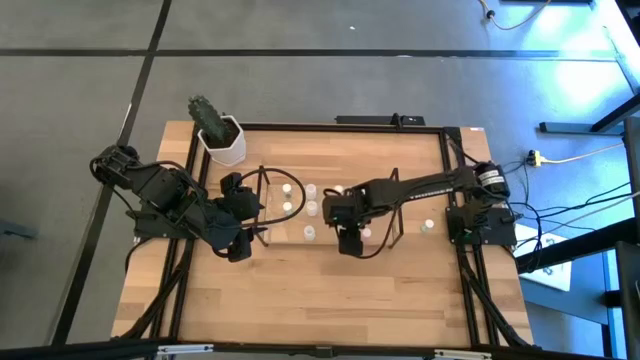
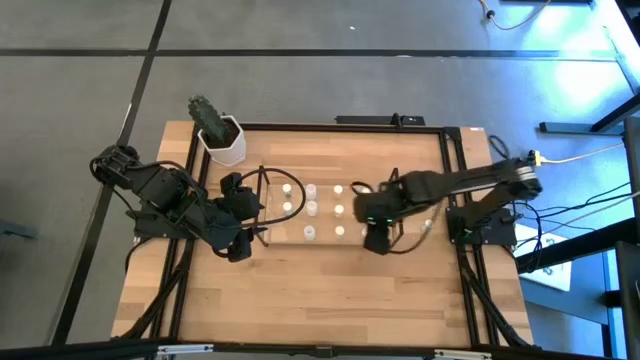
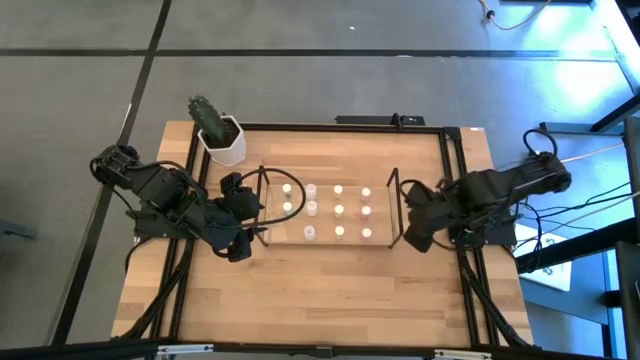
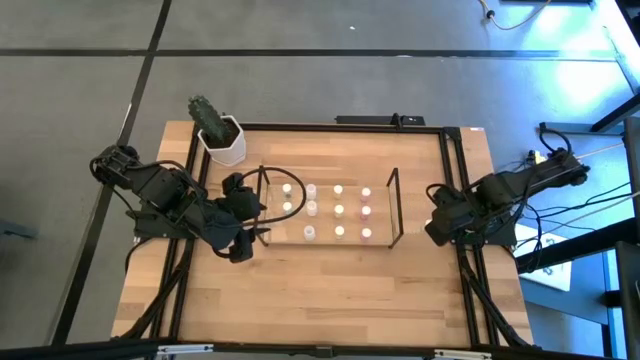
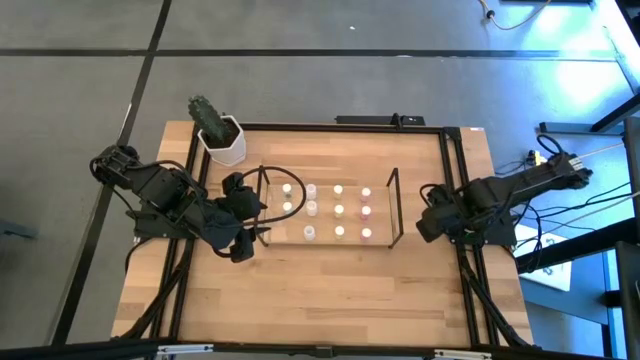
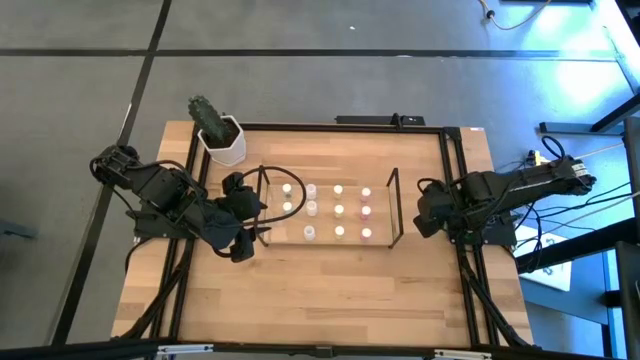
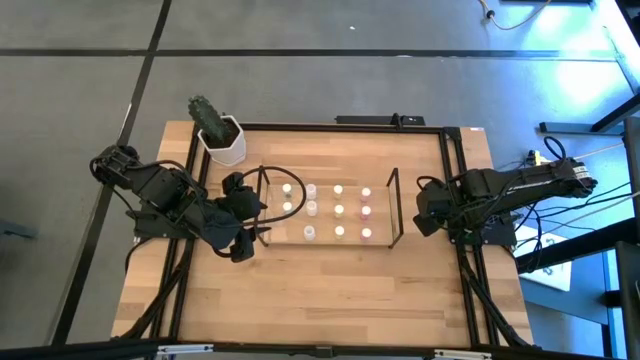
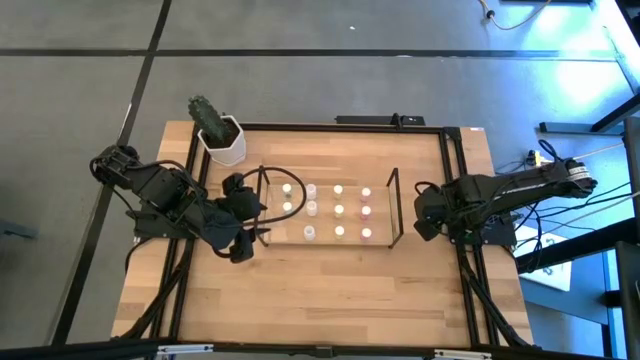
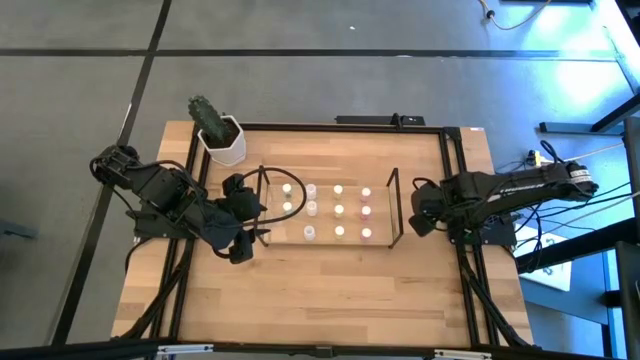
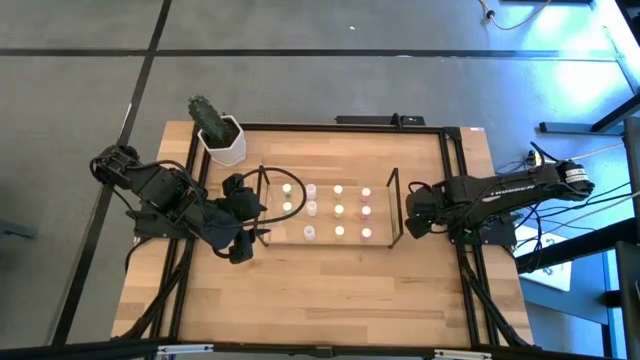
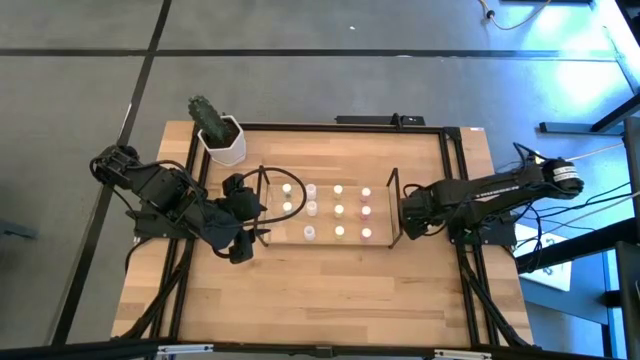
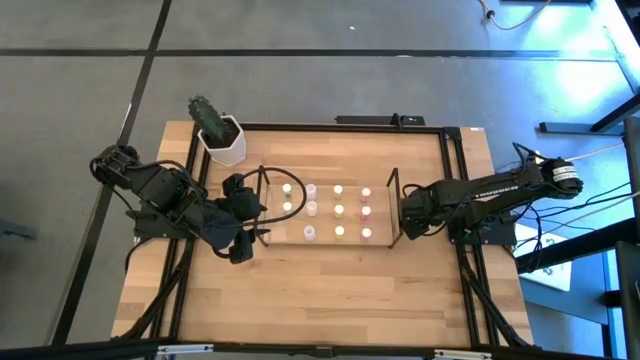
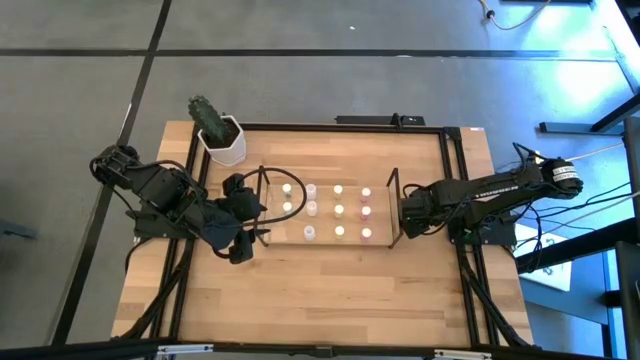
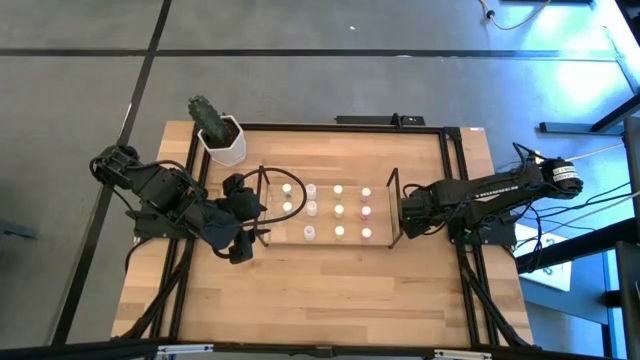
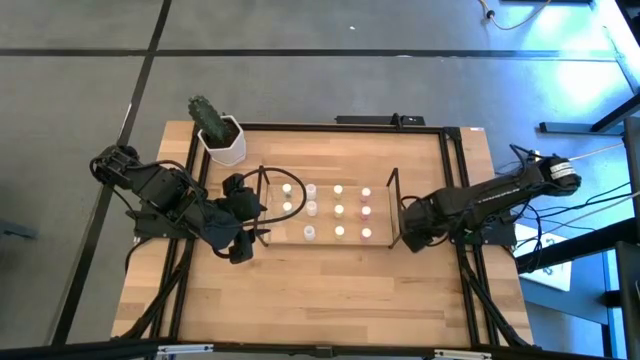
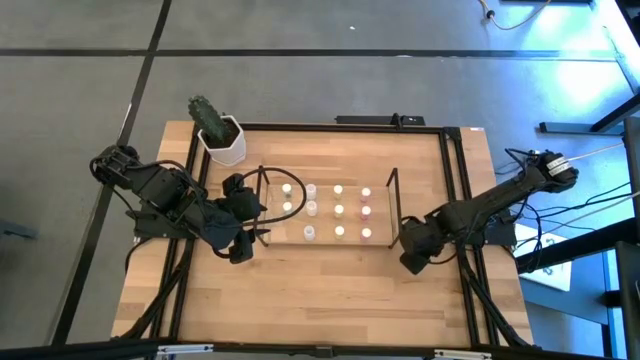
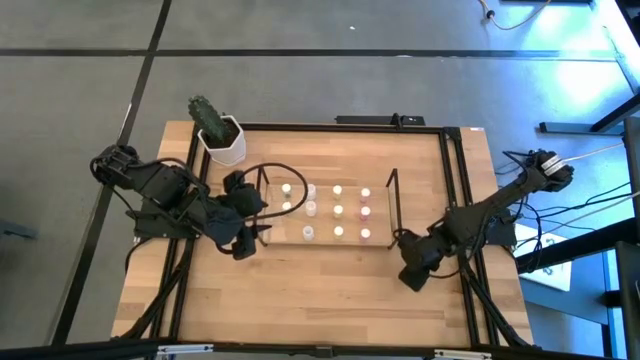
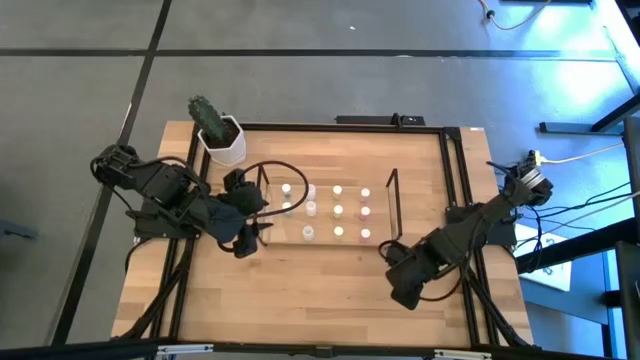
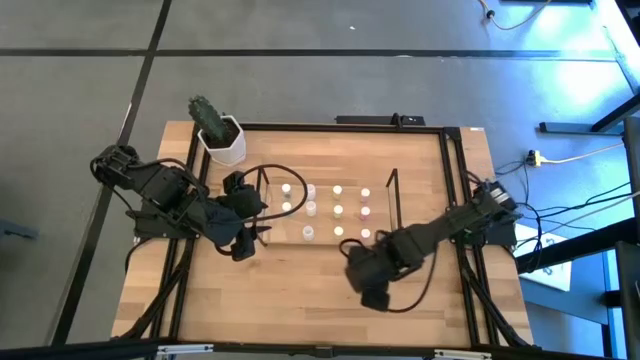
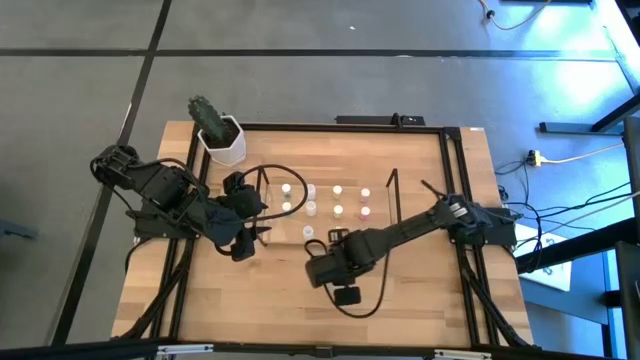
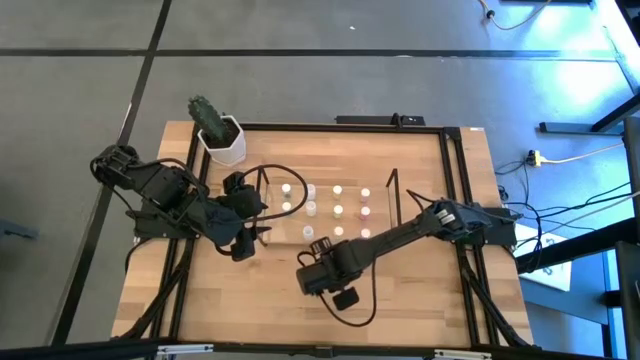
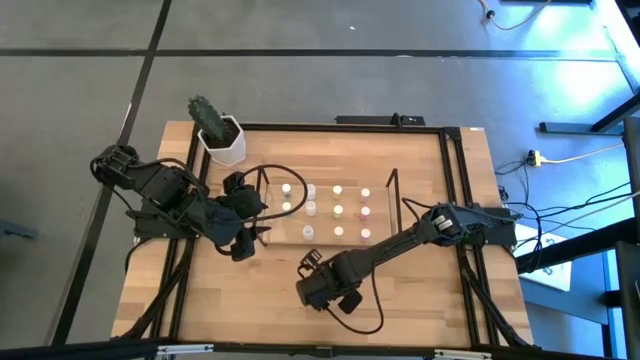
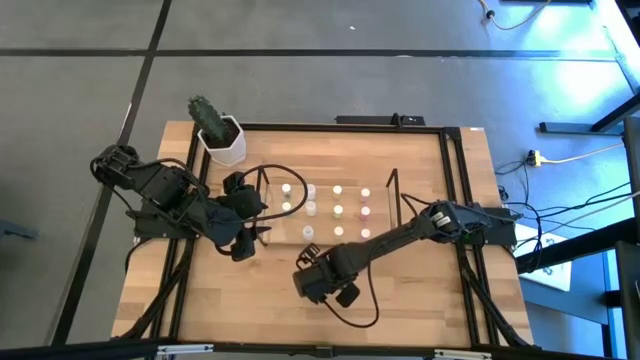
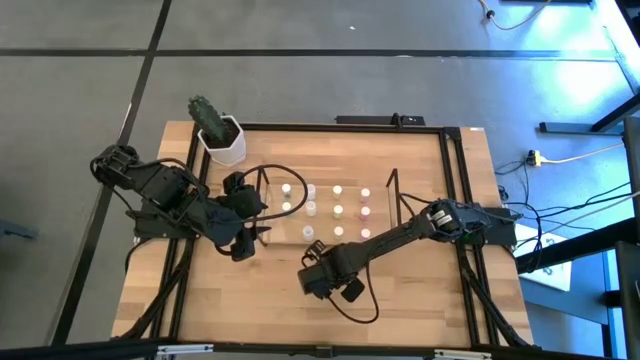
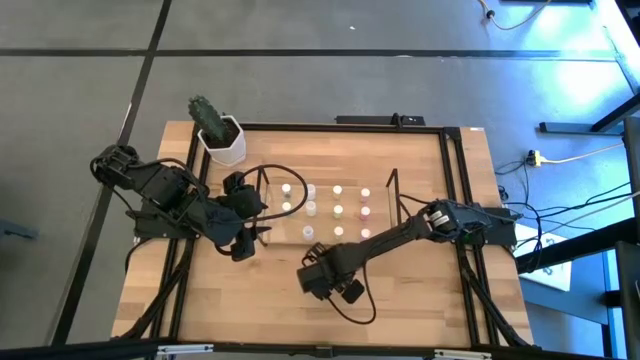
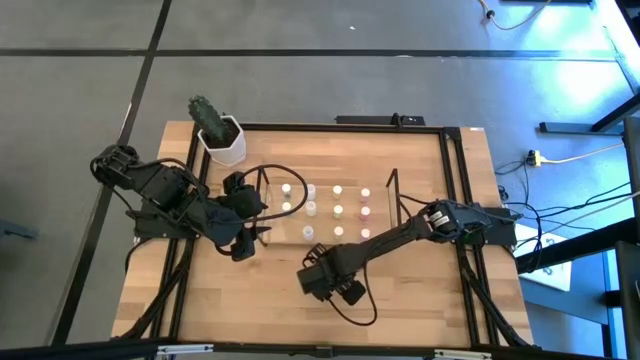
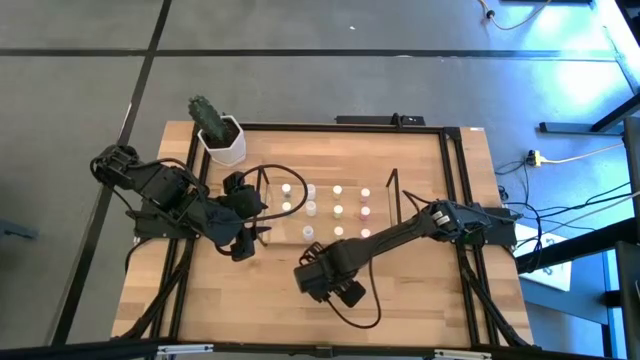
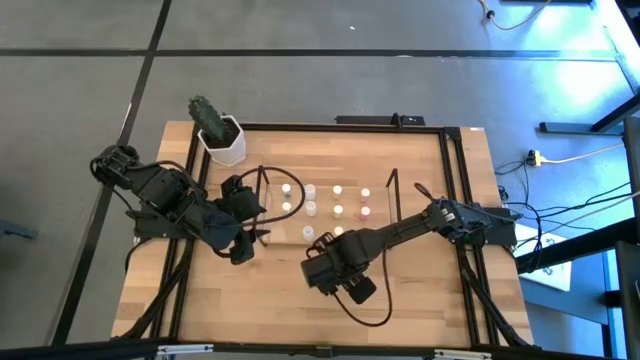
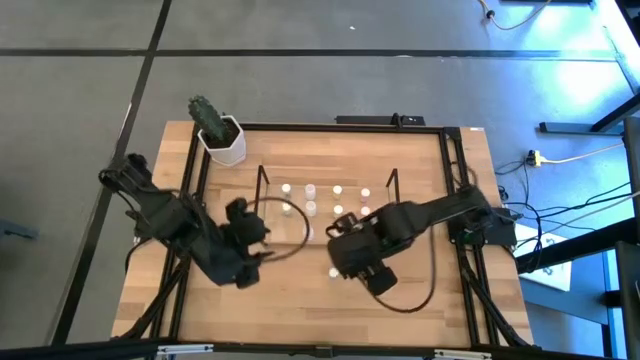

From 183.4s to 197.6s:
Task: Pick and place medicine bottles onto shelf by color
Put the blue pill bottle aligned with the other blue pill bottles on the shelf

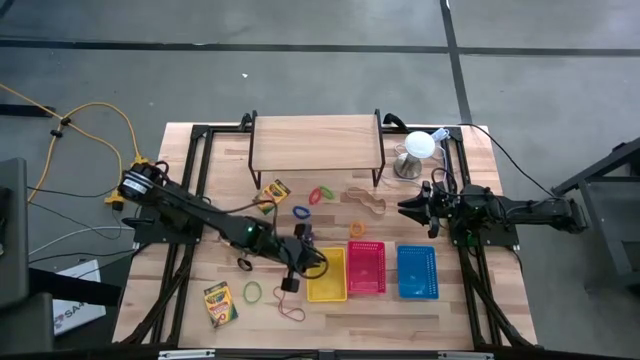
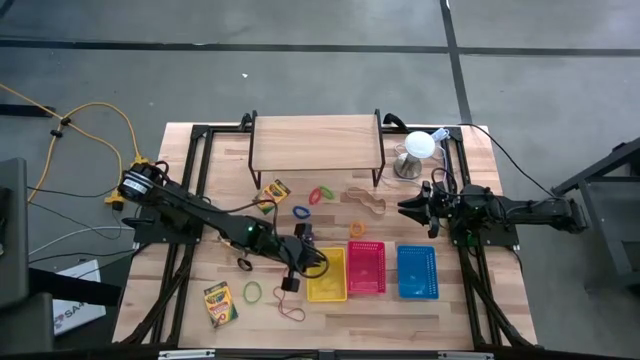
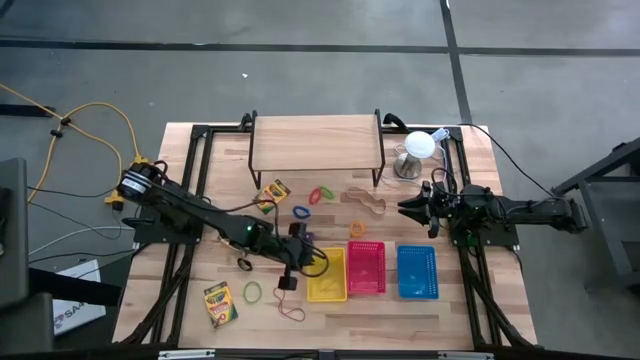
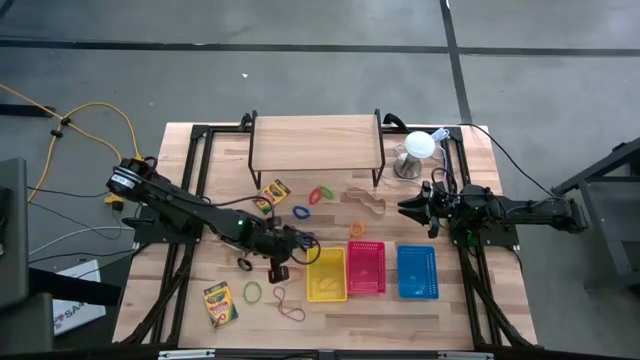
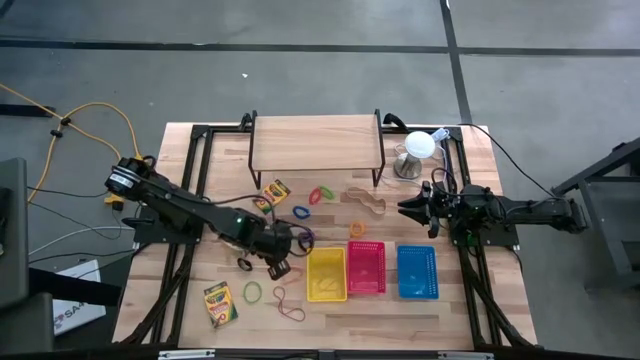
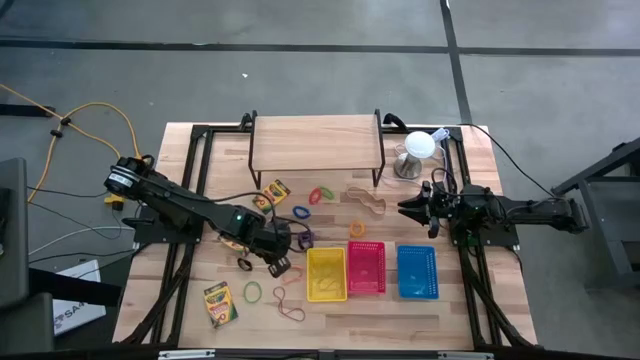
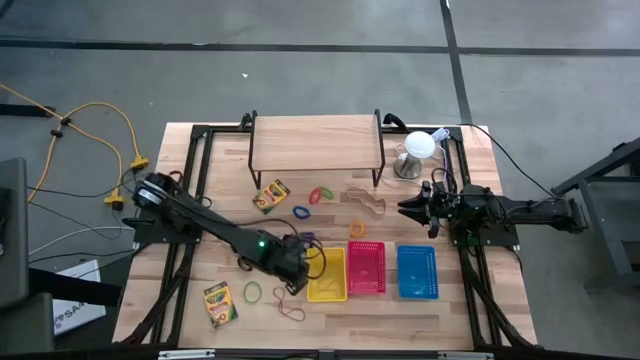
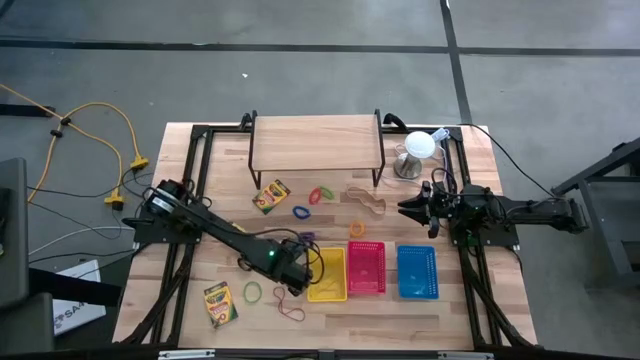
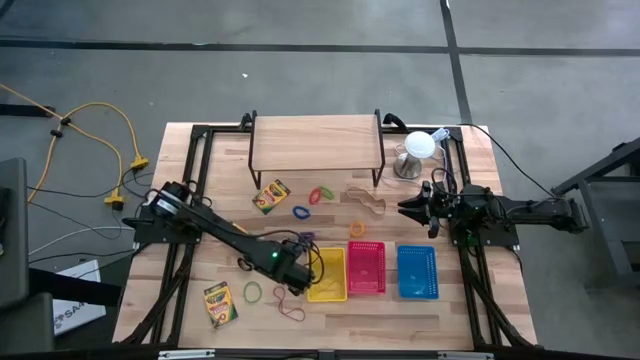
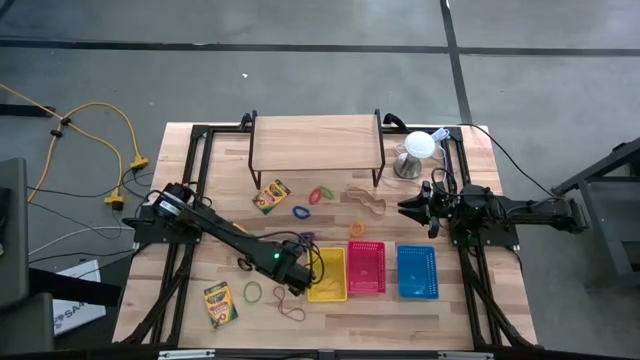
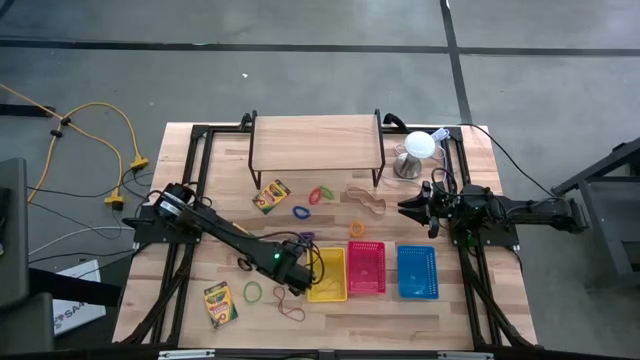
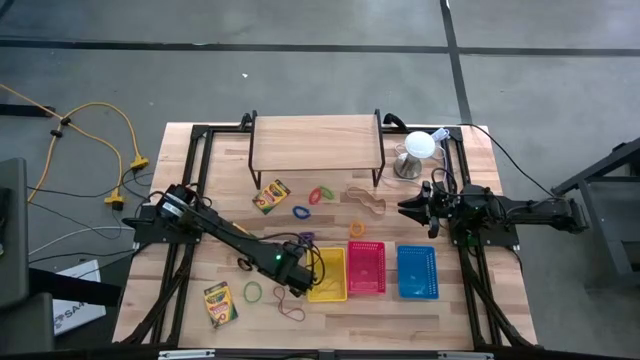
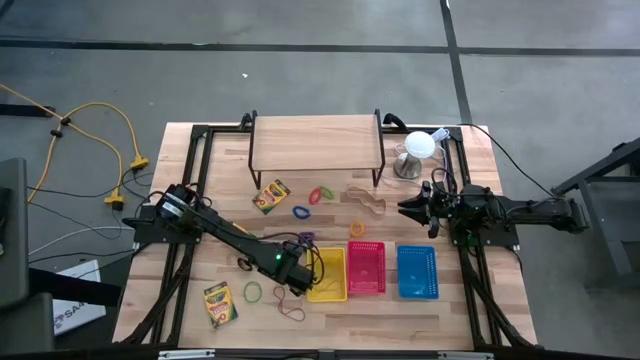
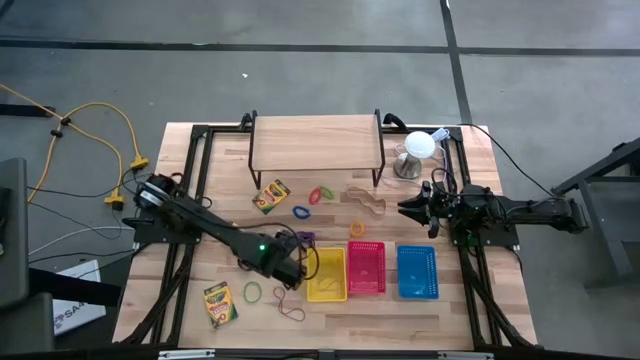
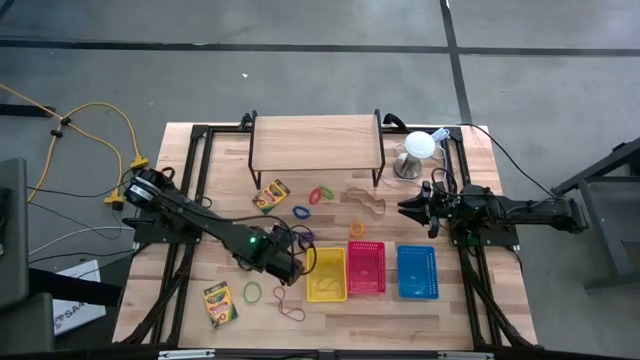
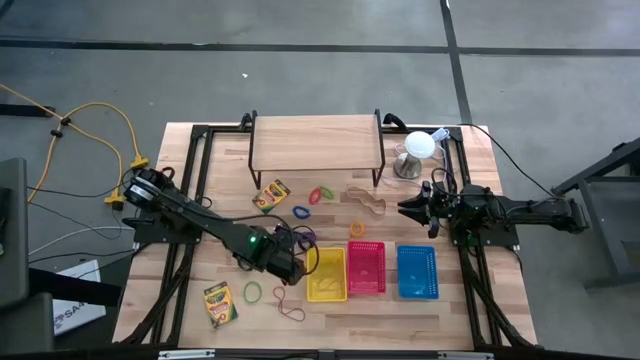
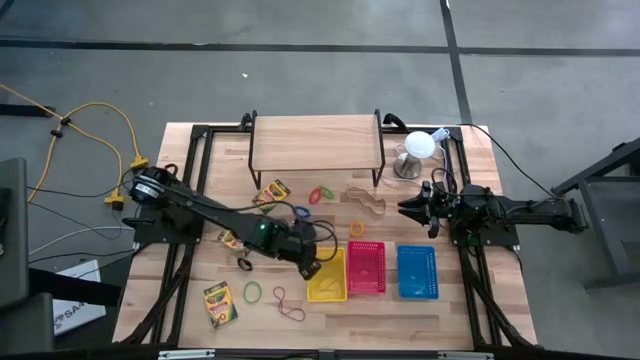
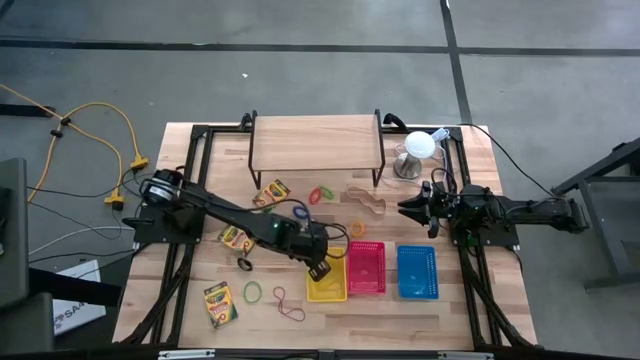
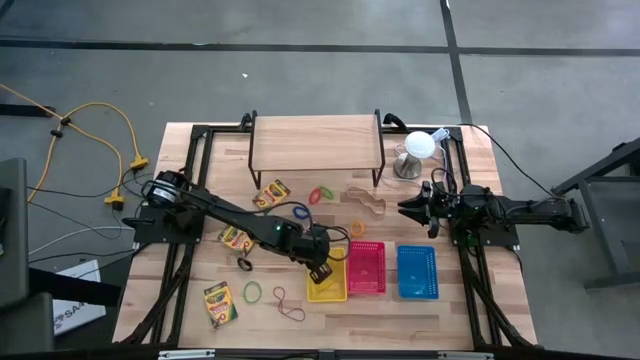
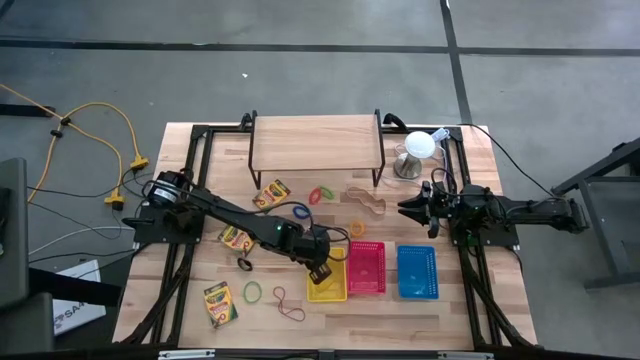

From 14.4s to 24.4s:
Task: Pick & Place Office Desk Supplies
Put the orange rubber band into the yellow bin
